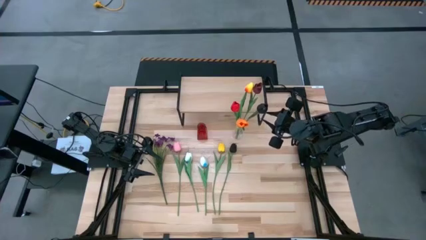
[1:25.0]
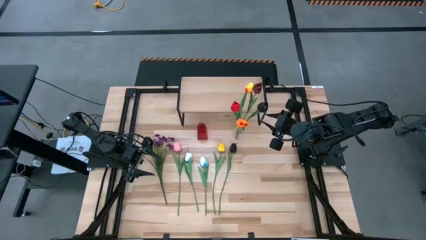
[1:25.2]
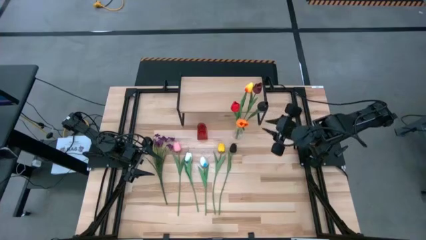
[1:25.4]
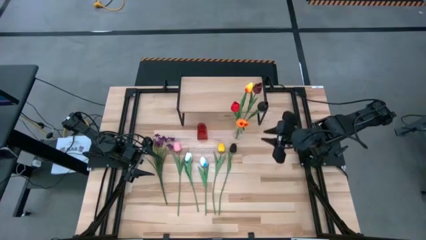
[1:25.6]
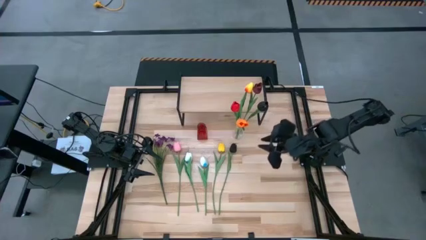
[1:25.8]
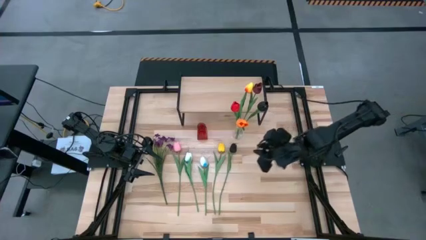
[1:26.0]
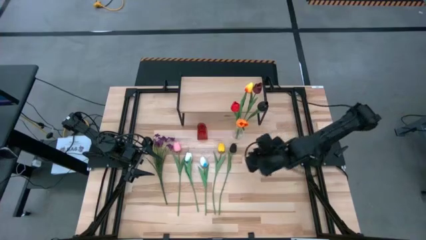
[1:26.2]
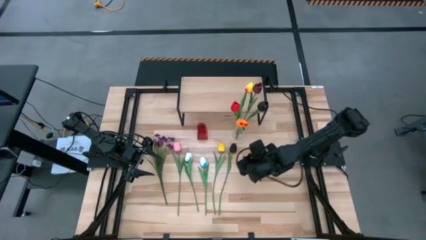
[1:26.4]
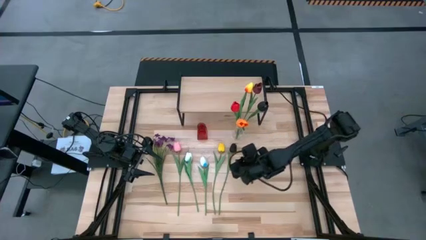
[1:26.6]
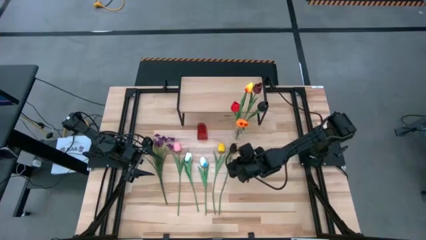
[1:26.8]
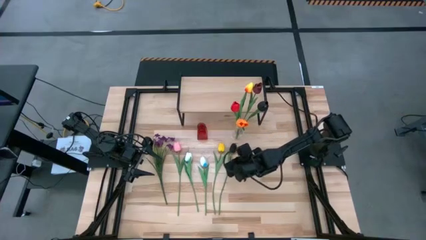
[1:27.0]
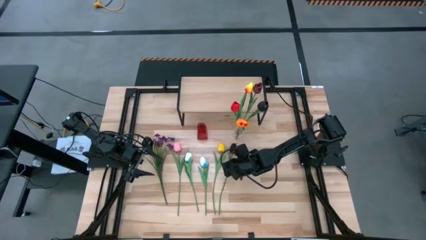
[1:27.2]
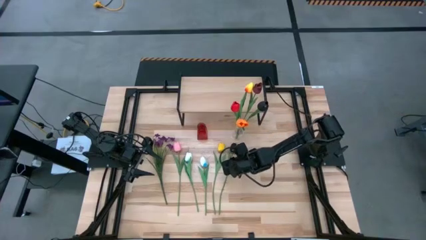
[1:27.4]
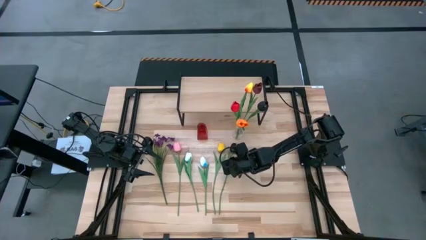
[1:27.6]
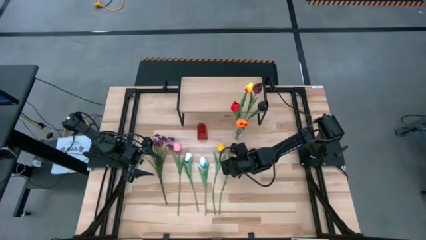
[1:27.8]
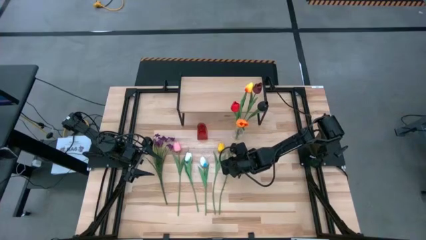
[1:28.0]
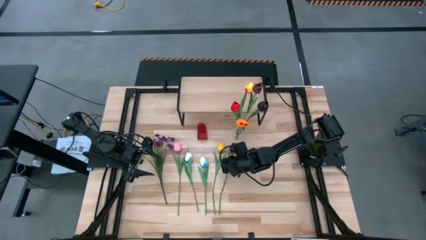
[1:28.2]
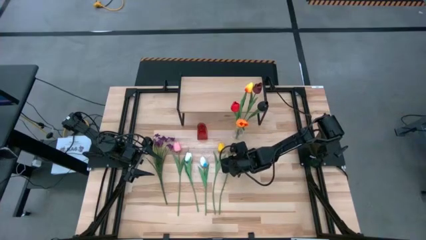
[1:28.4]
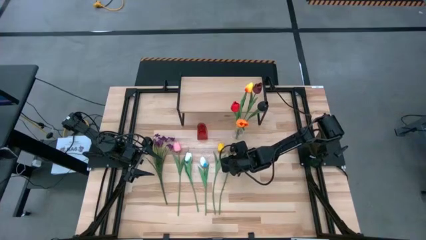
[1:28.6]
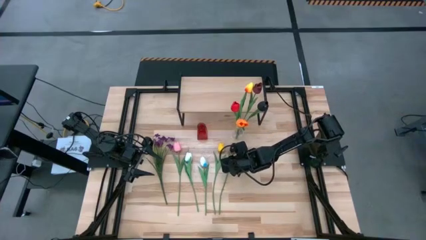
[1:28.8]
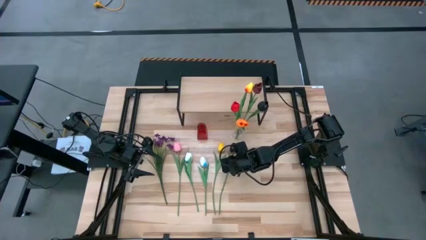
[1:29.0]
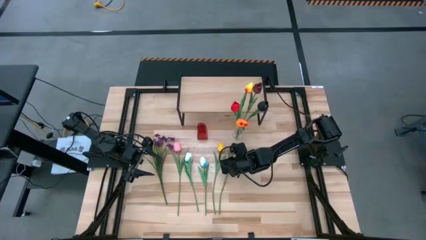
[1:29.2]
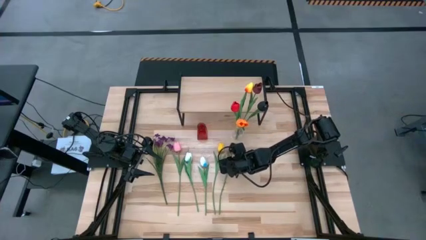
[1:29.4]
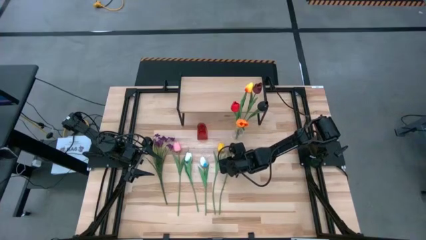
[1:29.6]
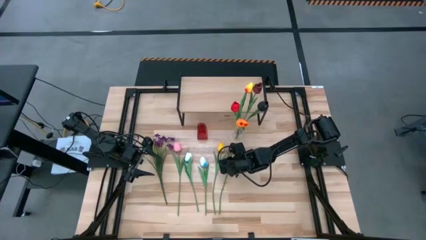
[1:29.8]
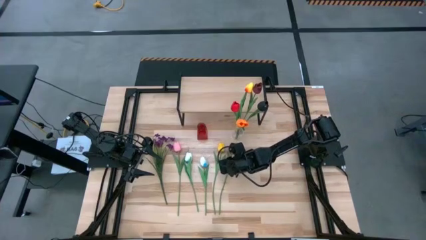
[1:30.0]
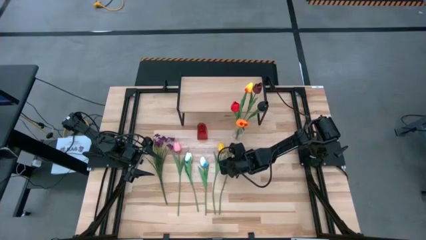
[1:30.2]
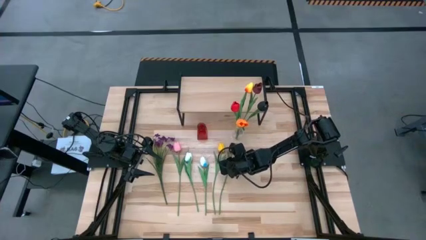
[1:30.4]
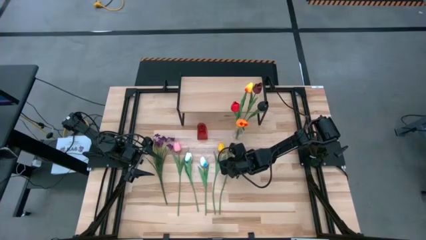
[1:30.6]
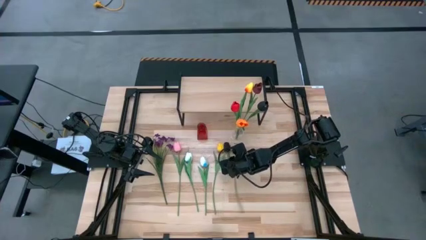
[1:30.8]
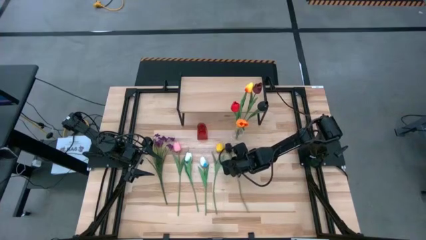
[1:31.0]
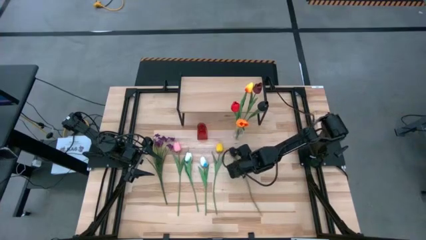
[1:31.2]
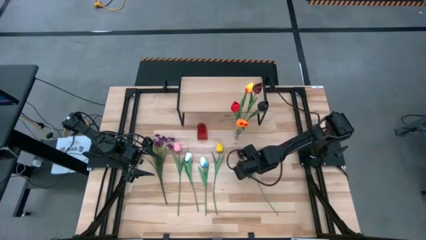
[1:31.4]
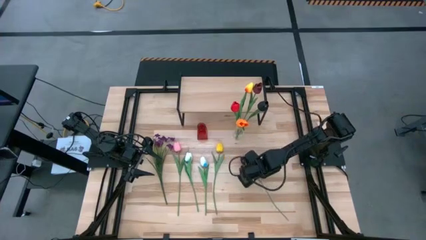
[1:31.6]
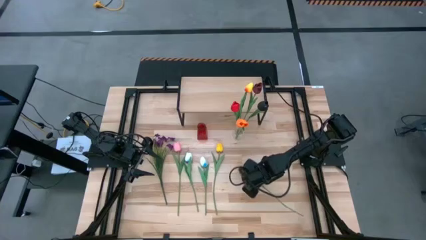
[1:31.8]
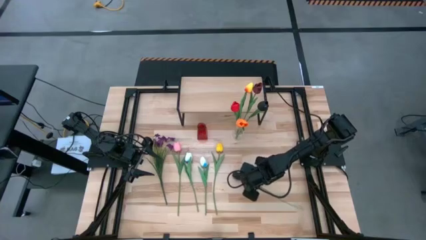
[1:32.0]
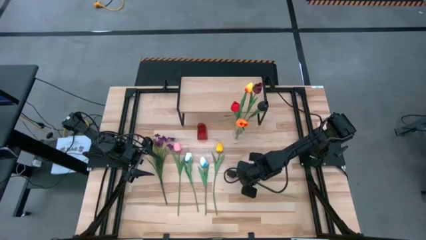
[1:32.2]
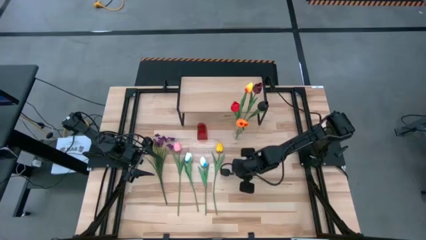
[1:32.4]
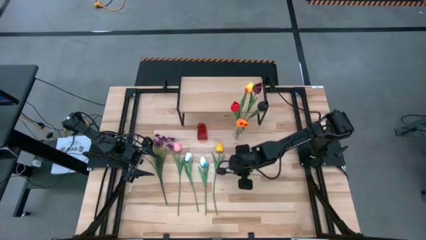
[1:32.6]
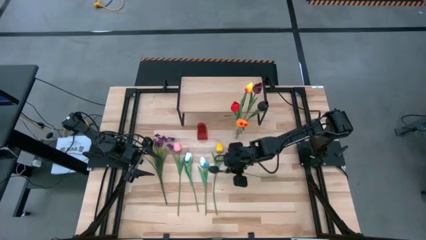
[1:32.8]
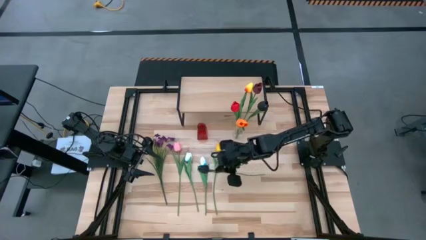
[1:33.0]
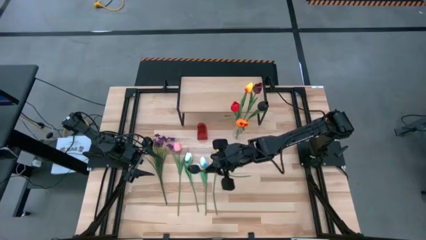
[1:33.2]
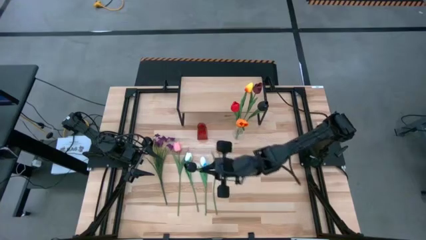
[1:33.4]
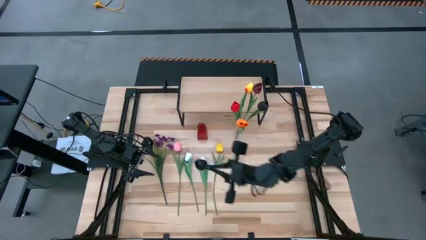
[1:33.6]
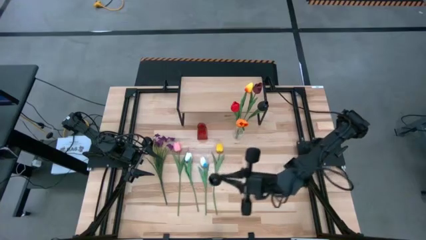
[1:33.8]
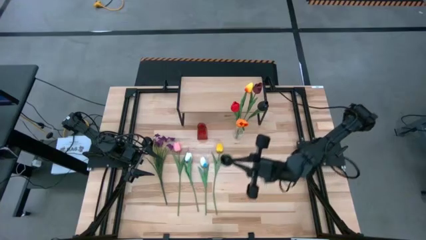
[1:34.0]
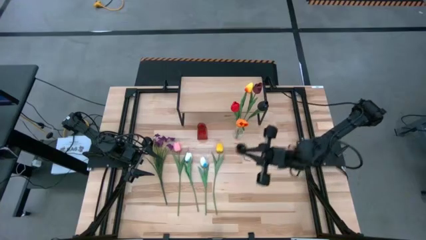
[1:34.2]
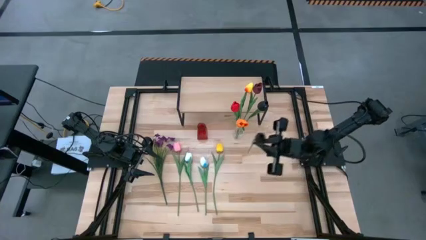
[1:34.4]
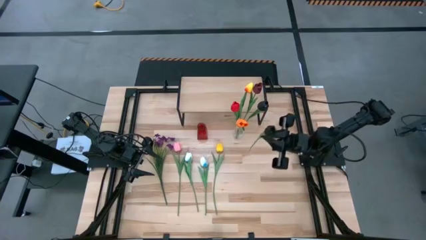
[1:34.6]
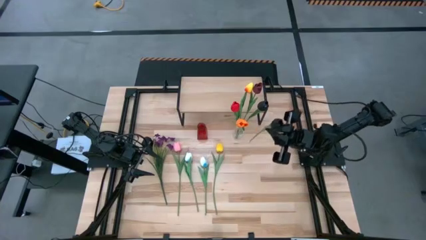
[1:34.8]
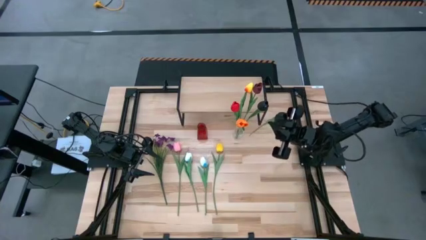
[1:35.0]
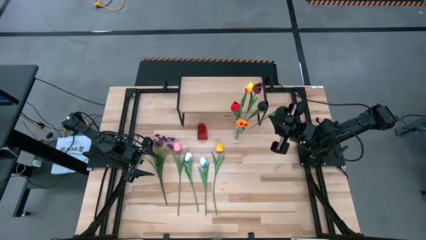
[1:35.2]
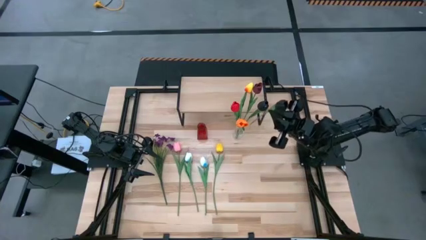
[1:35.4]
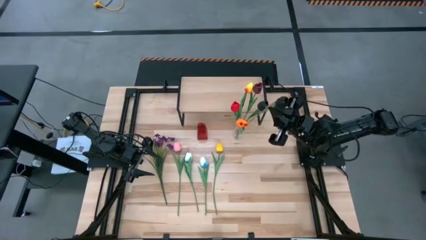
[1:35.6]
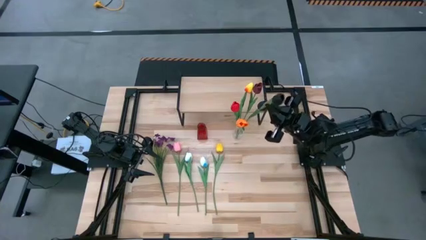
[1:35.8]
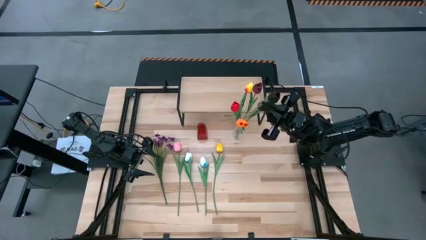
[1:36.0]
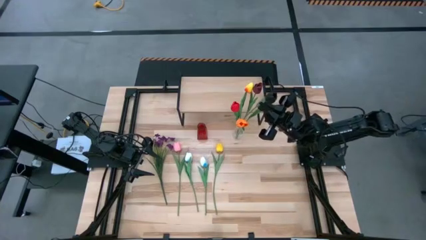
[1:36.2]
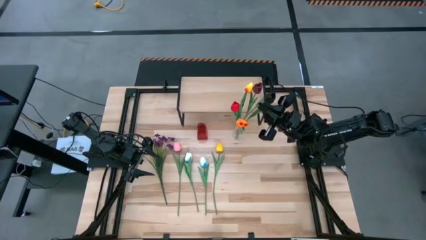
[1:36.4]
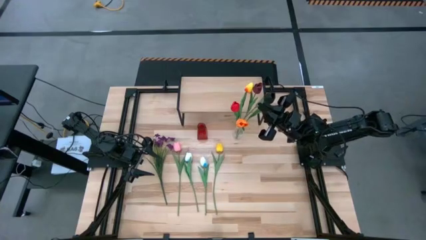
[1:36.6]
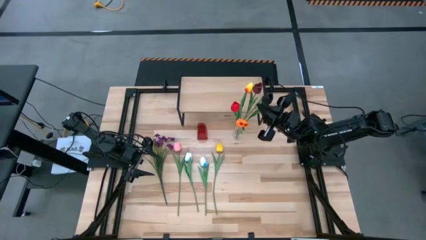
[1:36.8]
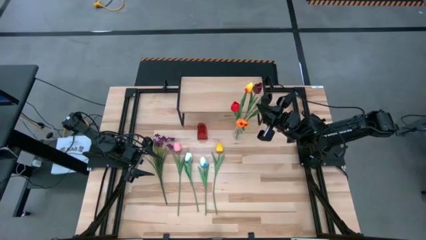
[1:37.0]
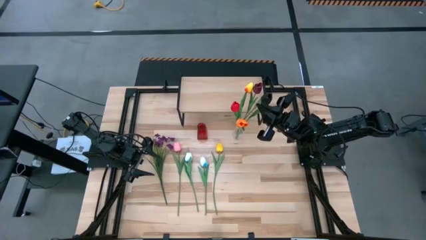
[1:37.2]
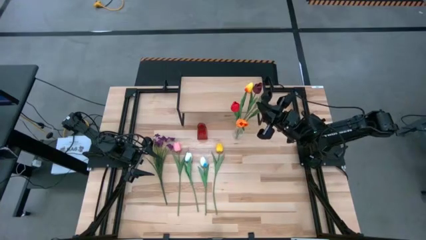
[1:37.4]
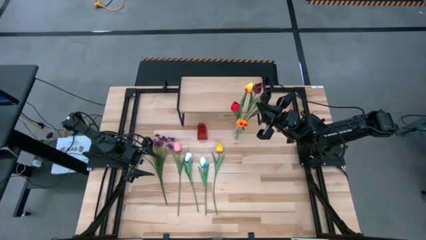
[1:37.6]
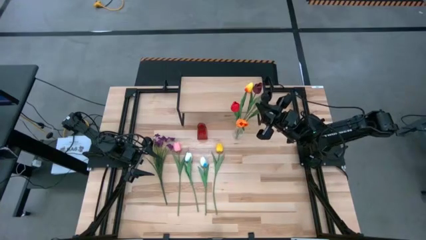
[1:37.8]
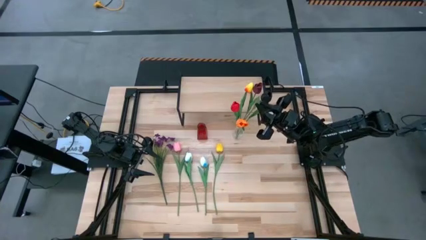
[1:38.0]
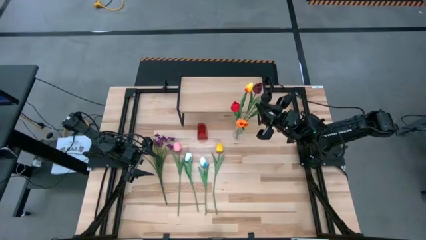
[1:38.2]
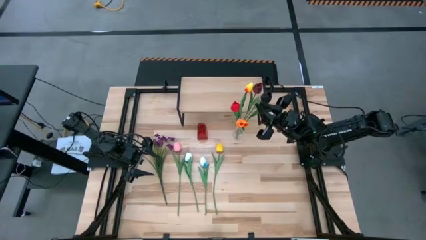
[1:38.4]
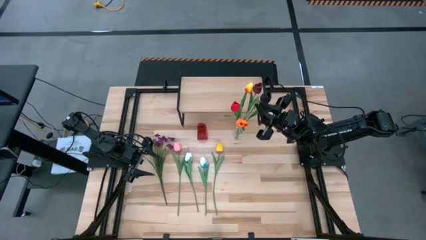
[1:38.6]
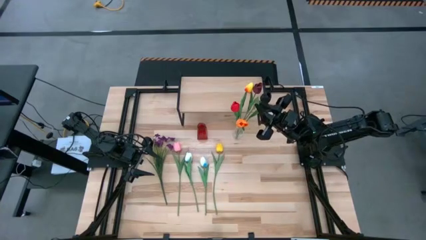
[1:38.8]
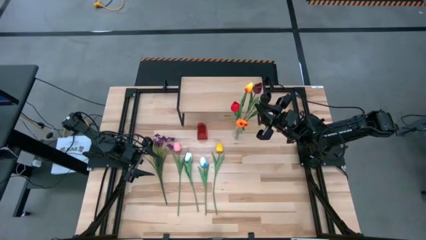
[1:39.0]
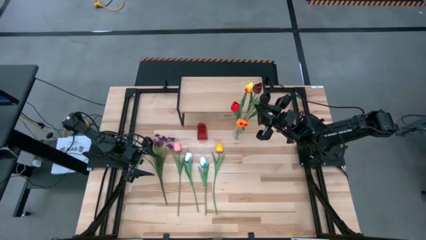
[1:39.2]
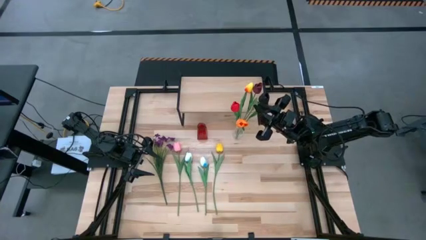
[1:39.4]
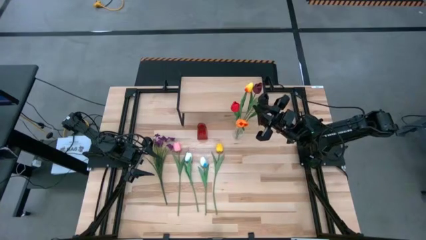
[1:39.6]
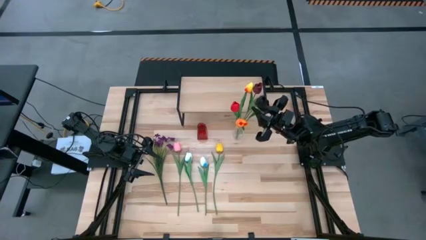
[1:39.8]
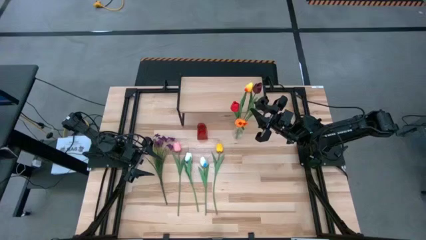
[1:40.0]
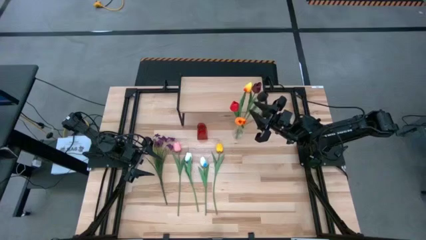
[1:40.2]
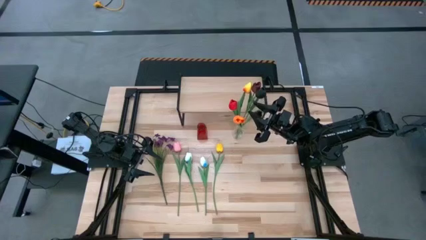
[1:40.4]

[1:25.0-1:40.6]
Task: Pick and place flowers into a vace then onto a shelf
Put the black flower into the transparent vase
